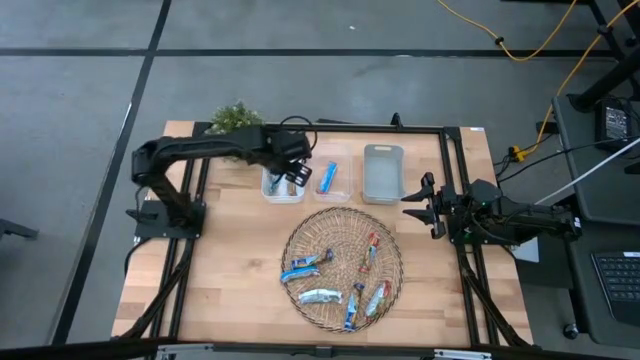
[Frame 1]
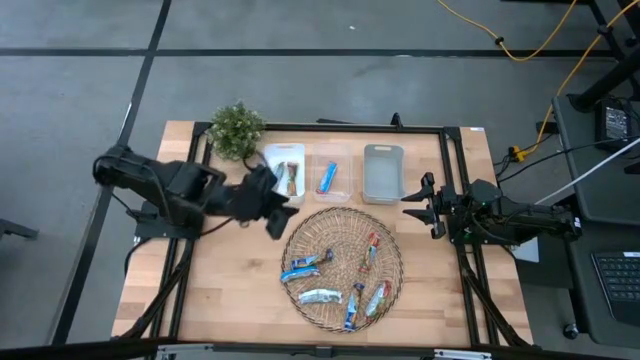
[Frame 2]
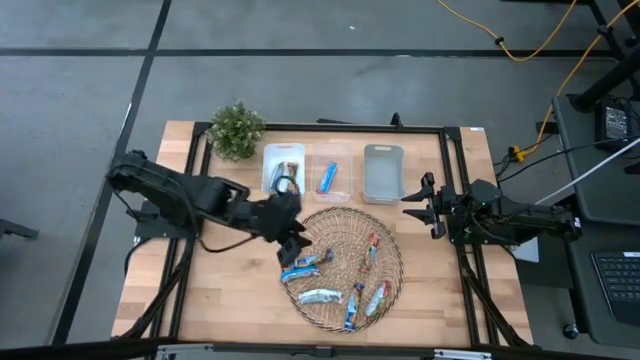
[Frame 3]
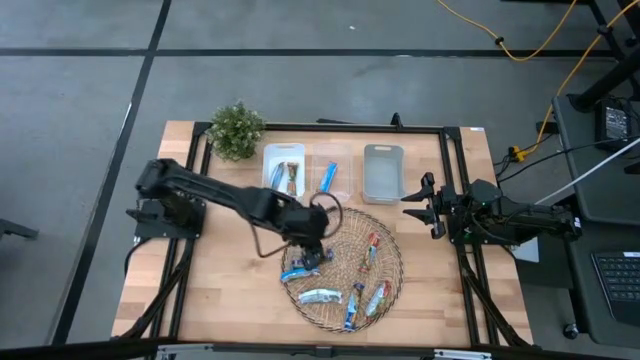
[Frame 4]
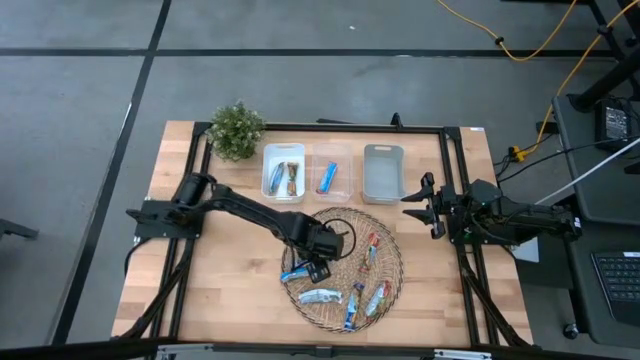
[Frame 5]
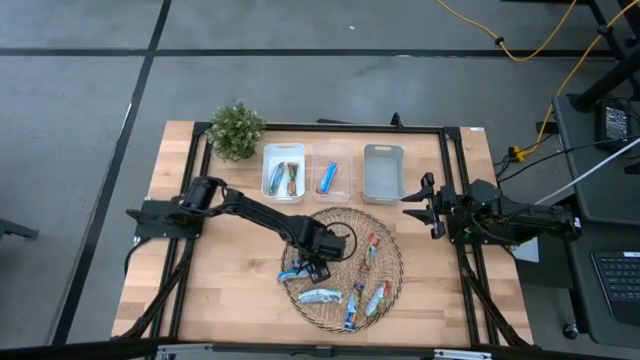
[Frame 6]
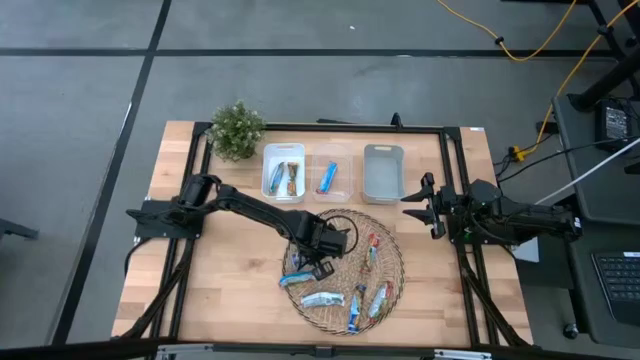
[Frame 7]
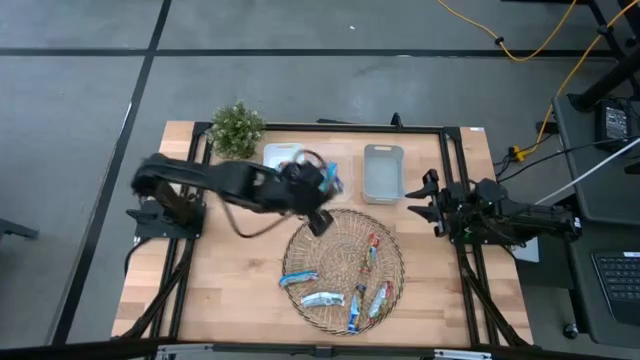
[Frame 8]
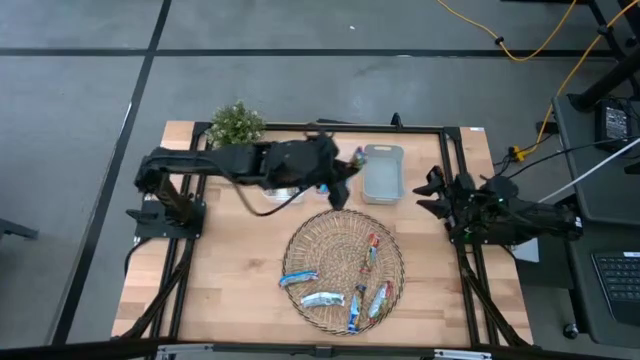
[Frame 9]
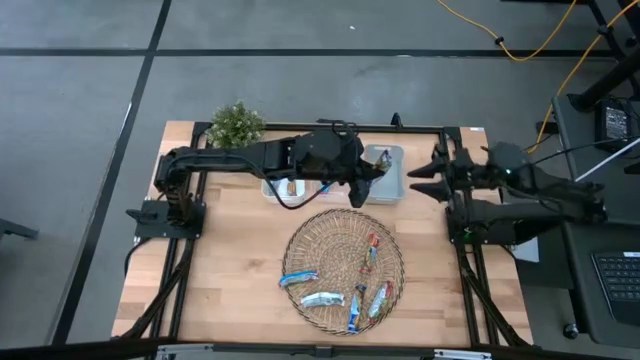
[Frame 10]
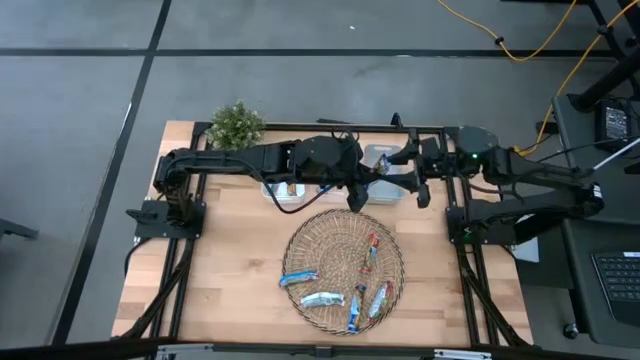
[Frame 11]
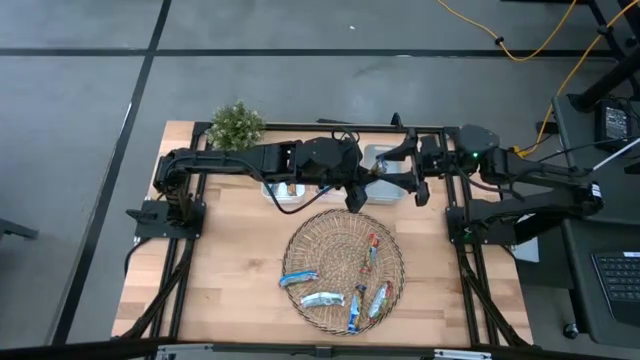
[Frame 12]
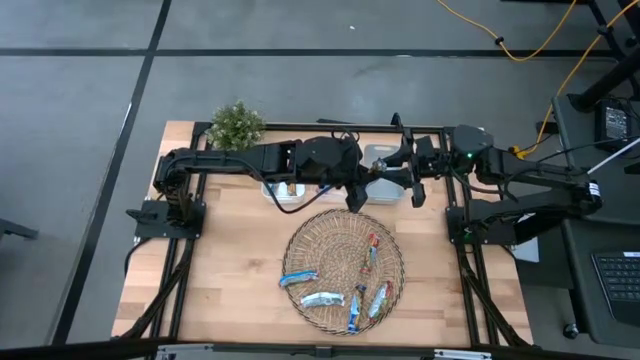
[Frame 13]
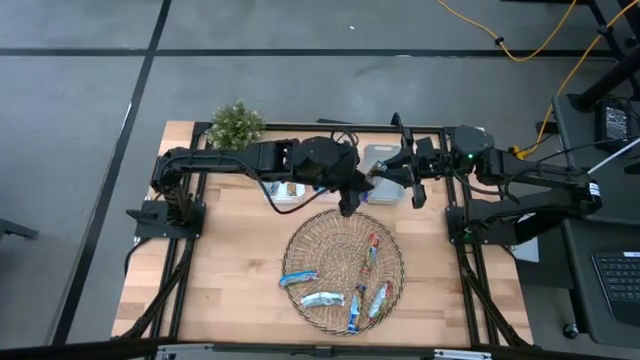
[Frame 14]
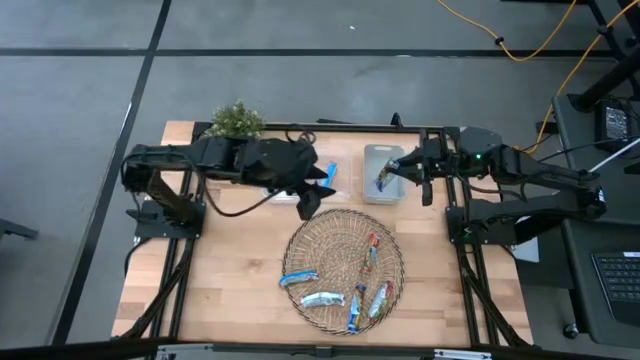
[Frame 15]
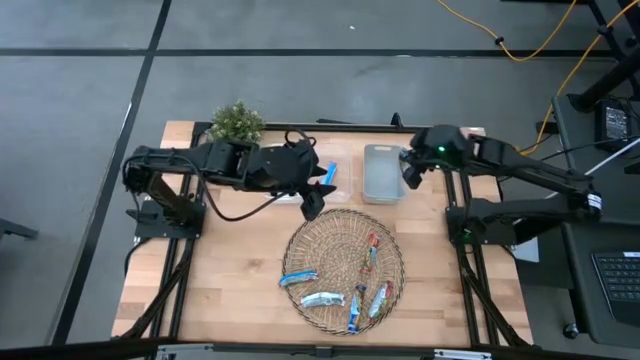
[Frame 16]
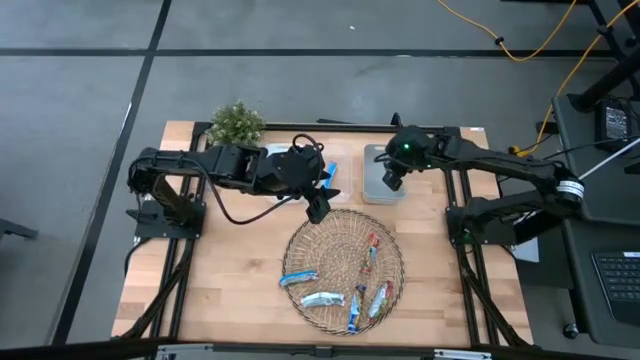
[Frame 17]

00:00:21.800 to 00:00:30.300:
Task: Pick and place Granola Bars by type
Put the blue granola bar into the gray bin

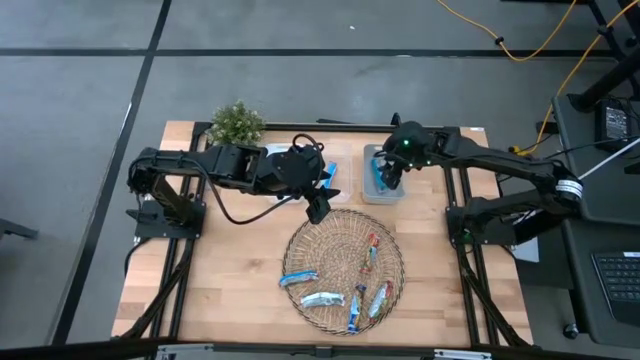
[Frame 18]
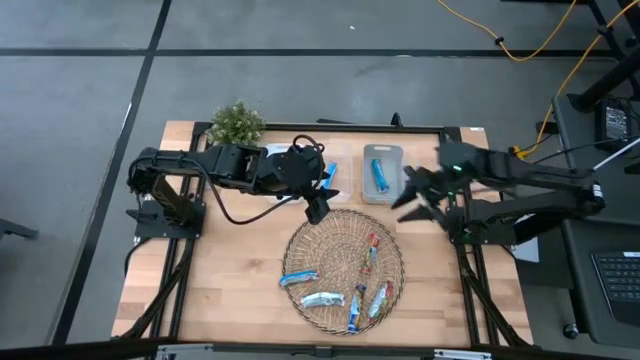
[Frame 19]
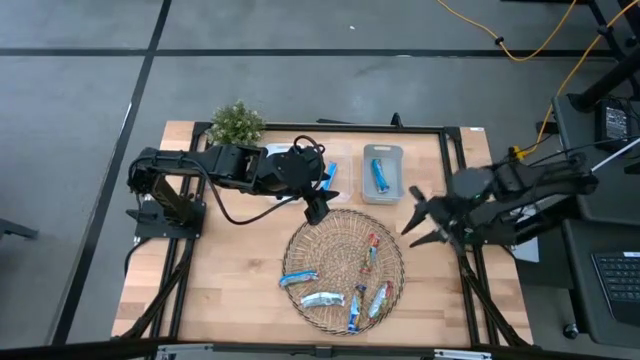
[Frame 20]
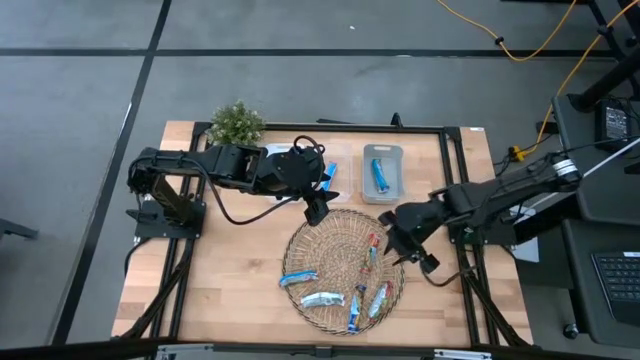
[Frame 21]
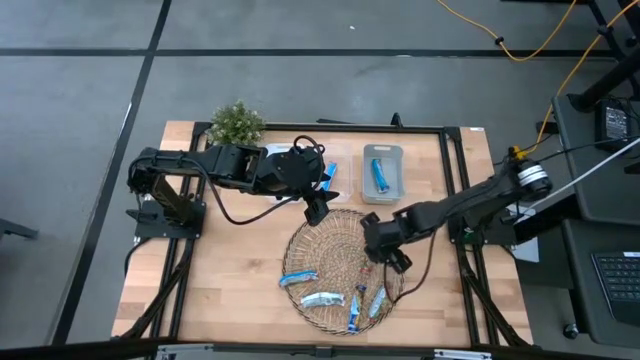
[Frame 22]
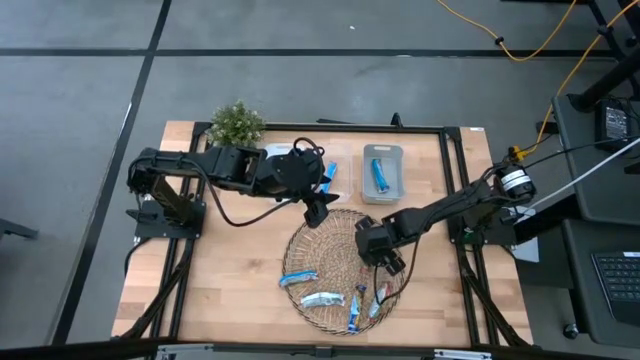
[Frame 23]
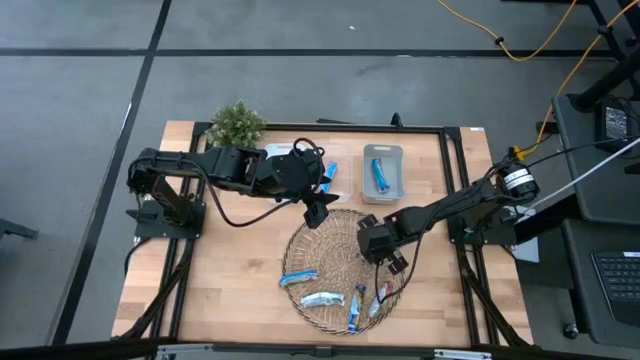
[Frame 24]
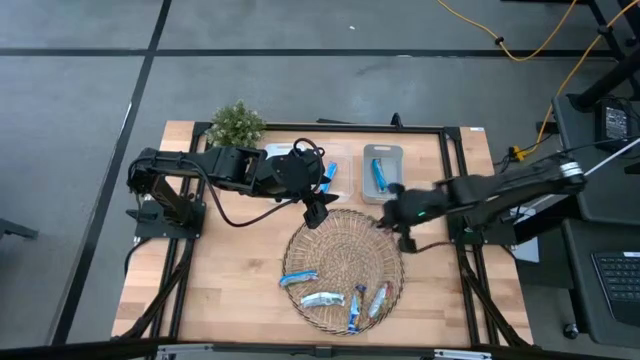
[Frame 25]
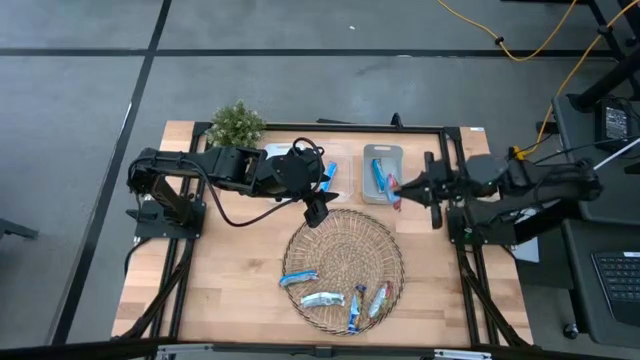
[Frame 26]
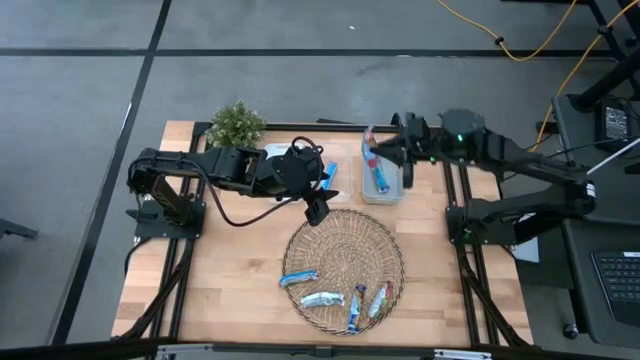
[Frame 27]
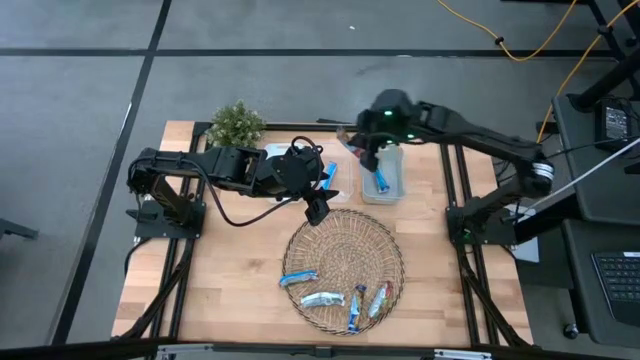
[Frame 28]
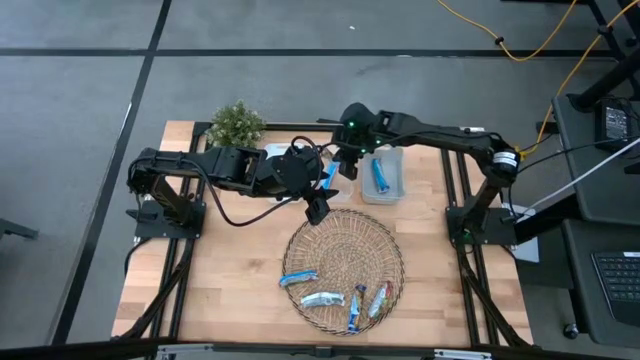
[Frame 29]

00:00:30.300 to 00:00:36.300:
Put the red granola bar into the transparent bin

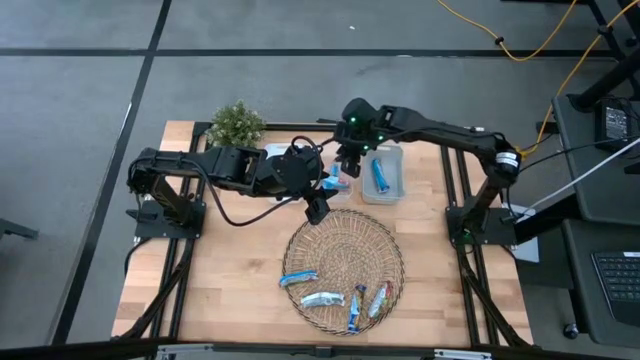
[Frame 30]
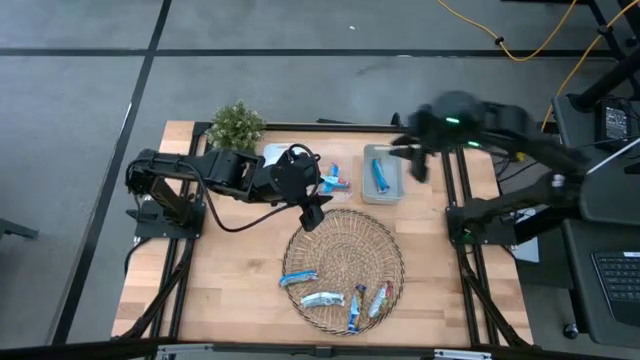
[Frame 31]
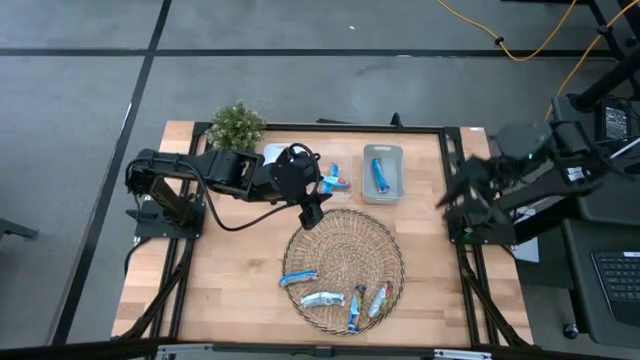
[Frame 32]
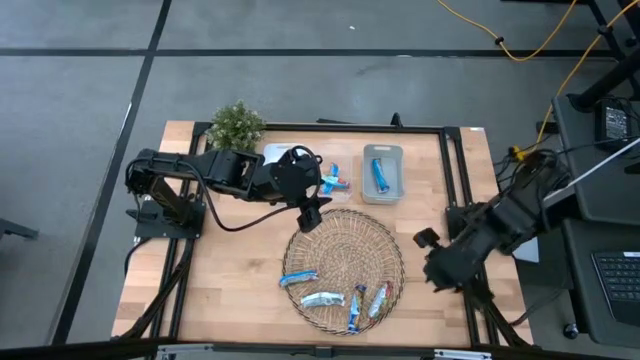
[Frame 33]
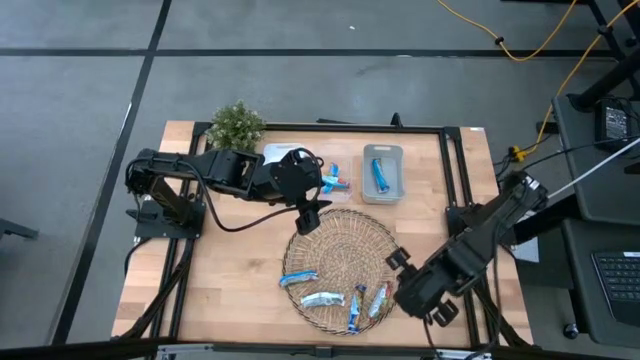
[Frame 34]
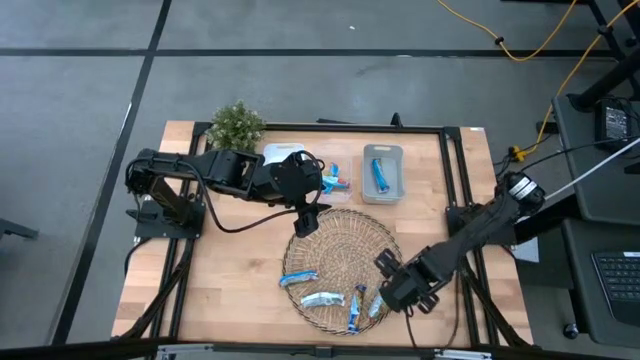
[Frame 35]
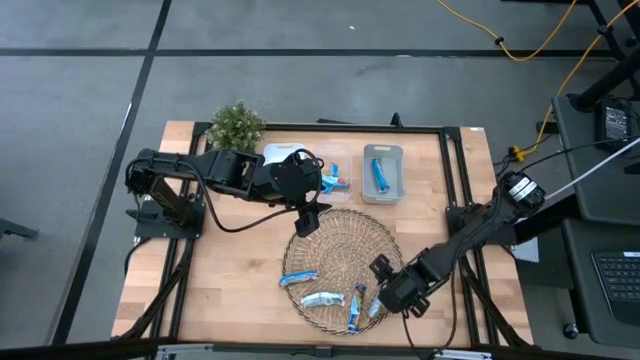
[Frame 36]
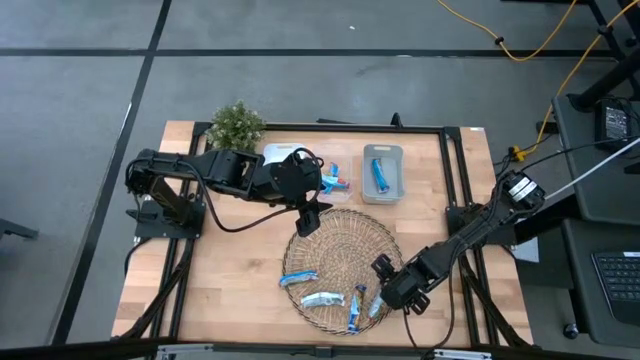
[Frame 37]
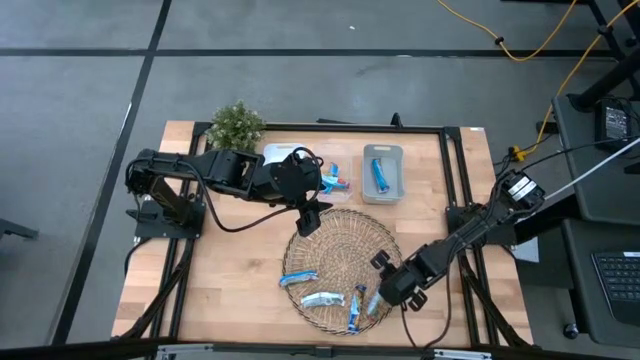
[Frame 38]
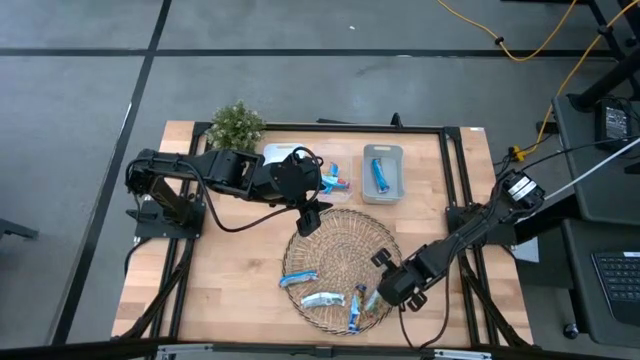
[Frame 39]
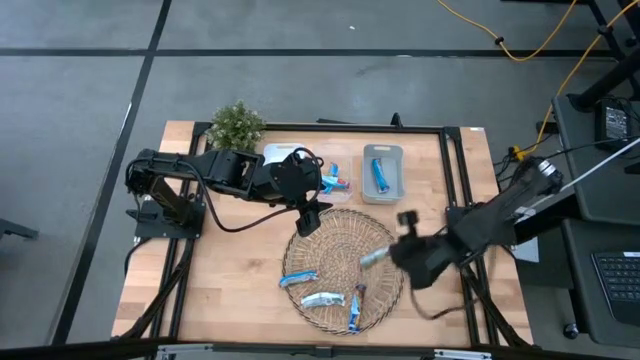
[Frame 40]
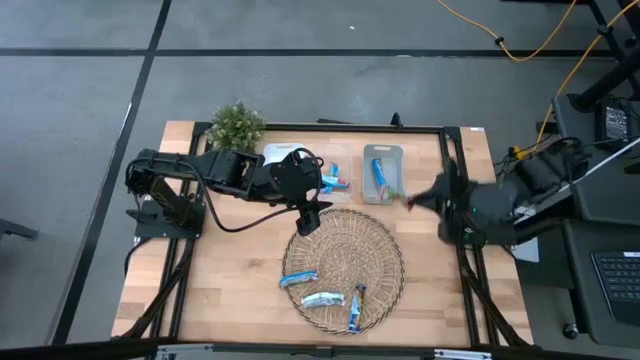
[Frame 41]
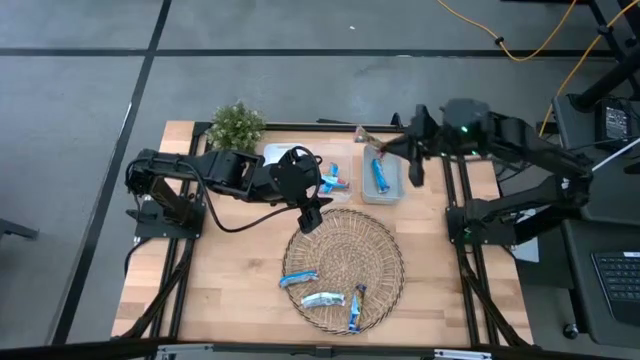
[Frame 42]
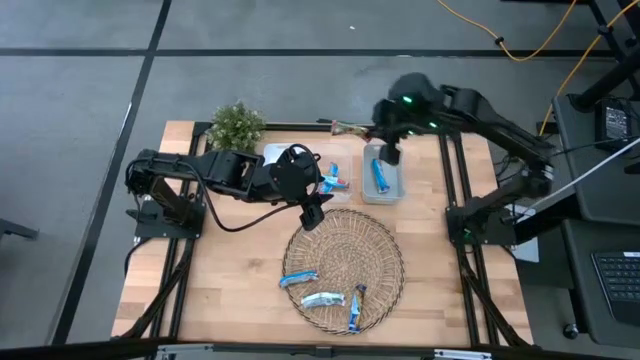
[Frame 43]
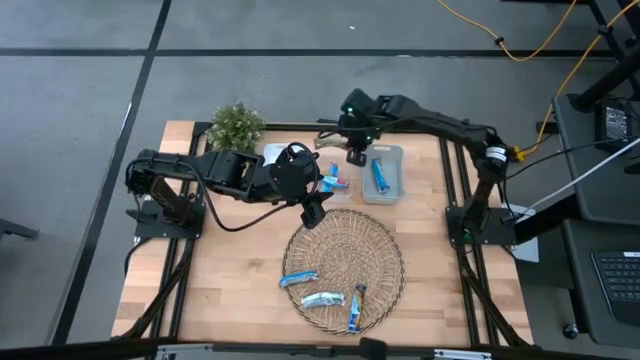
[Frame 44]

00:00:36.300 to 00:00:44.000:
Put the red granola bar into the transparent bin
